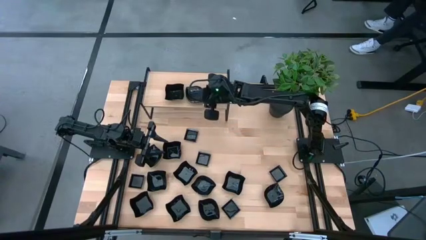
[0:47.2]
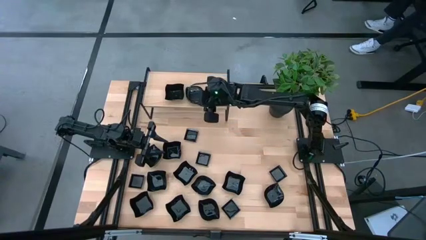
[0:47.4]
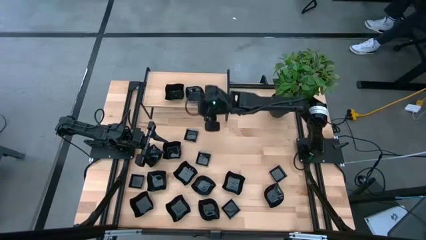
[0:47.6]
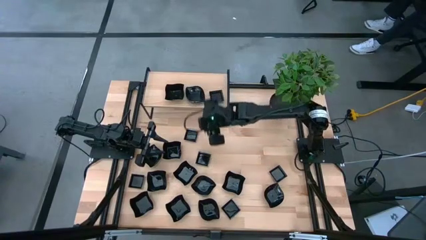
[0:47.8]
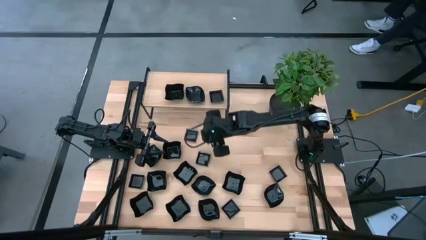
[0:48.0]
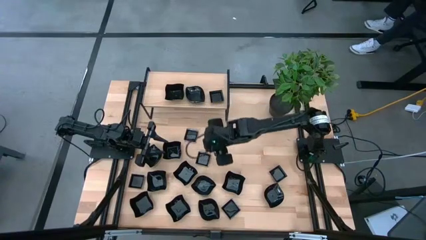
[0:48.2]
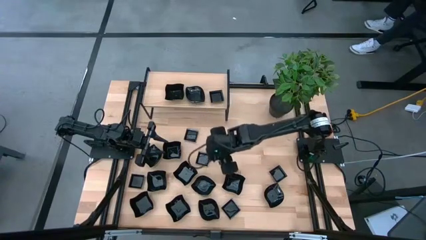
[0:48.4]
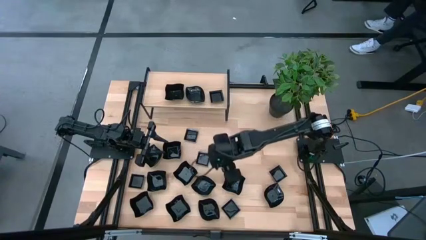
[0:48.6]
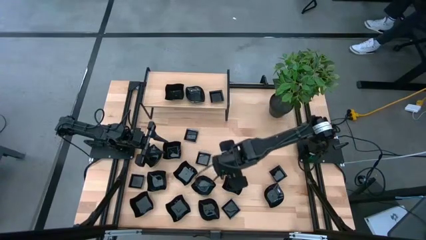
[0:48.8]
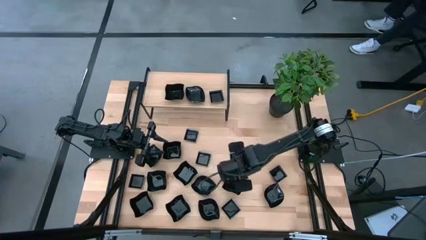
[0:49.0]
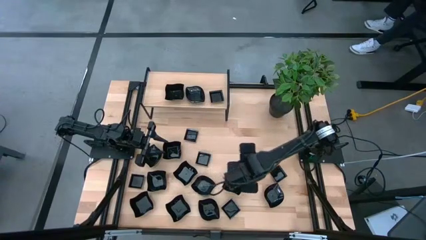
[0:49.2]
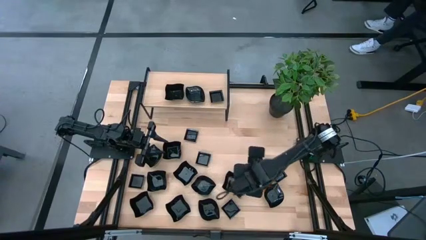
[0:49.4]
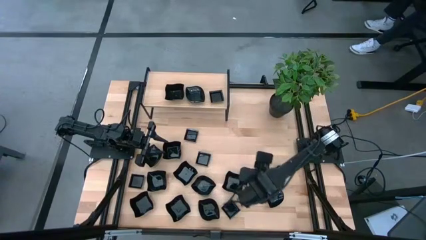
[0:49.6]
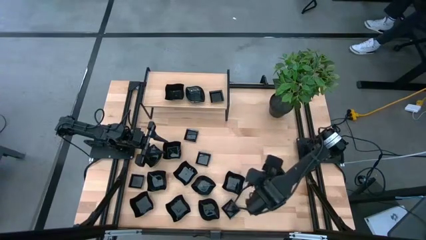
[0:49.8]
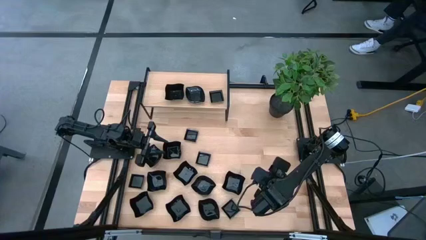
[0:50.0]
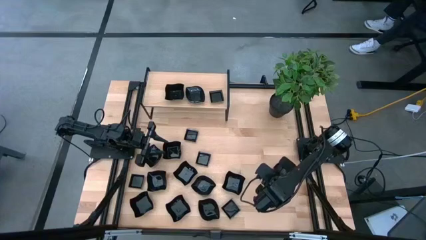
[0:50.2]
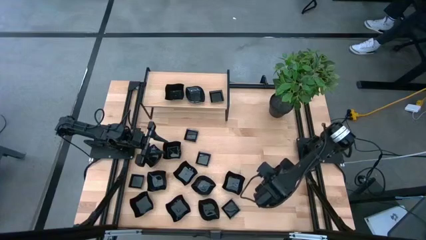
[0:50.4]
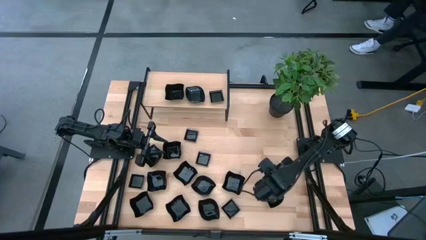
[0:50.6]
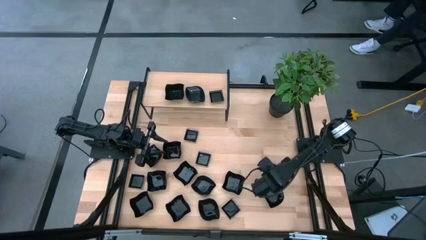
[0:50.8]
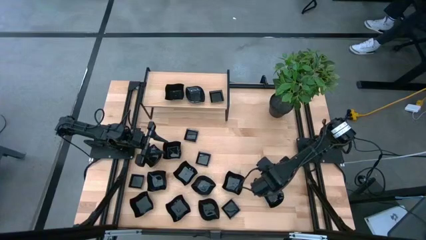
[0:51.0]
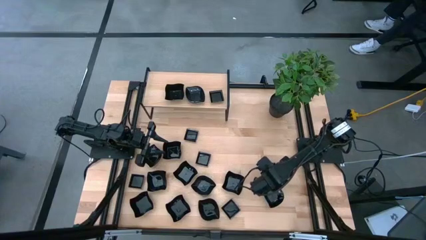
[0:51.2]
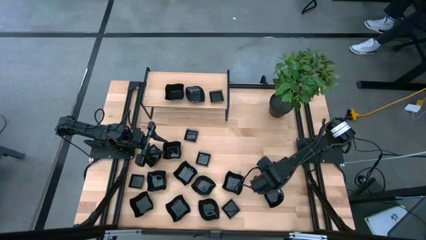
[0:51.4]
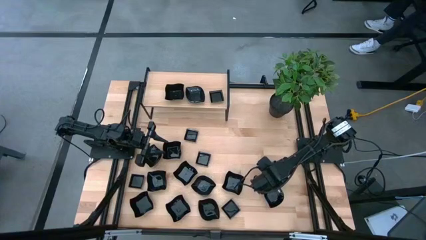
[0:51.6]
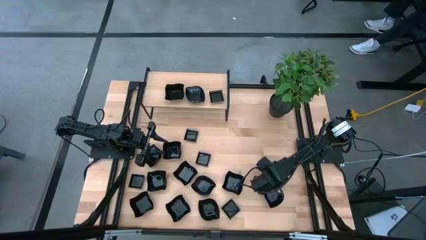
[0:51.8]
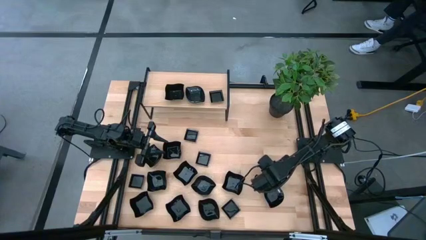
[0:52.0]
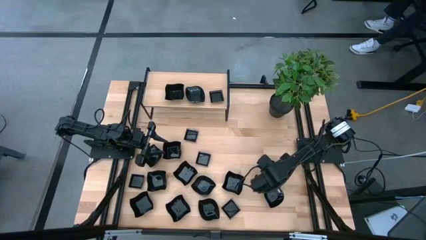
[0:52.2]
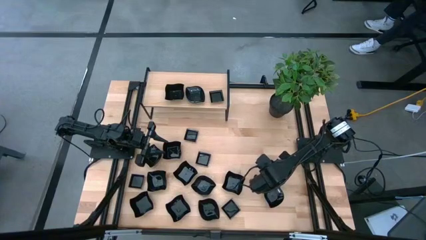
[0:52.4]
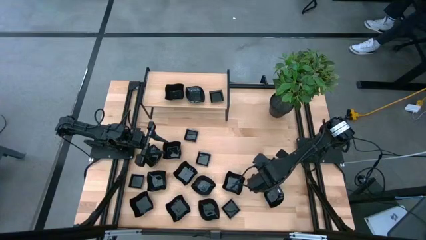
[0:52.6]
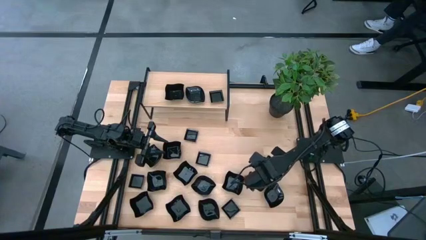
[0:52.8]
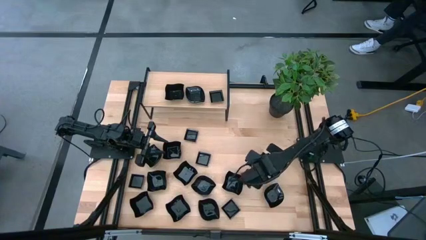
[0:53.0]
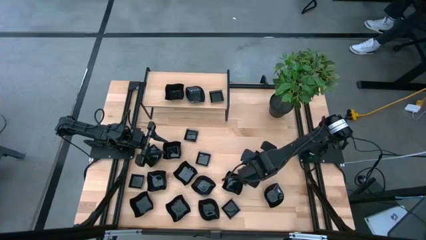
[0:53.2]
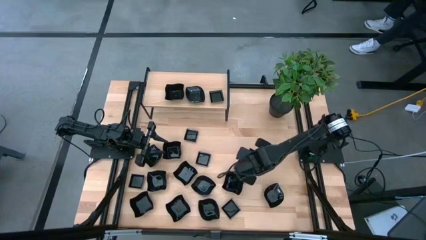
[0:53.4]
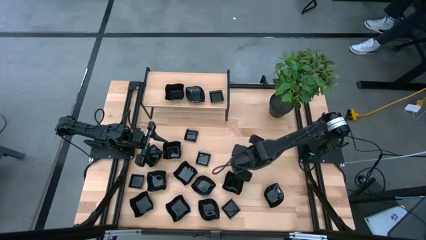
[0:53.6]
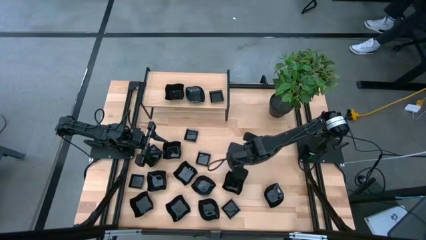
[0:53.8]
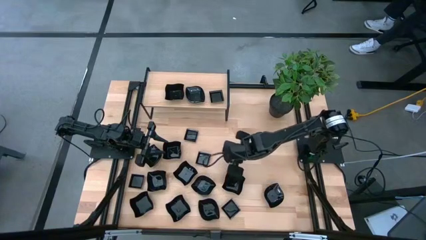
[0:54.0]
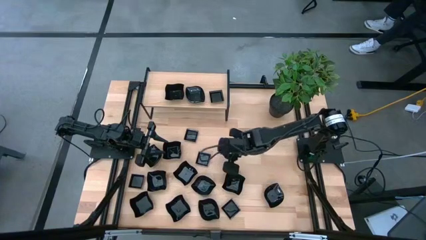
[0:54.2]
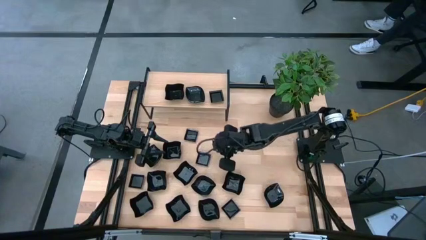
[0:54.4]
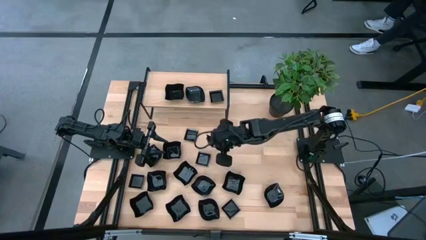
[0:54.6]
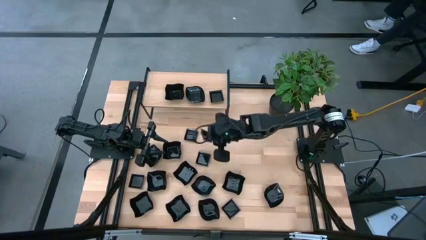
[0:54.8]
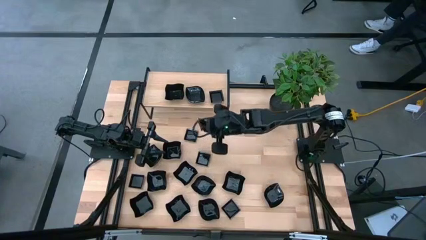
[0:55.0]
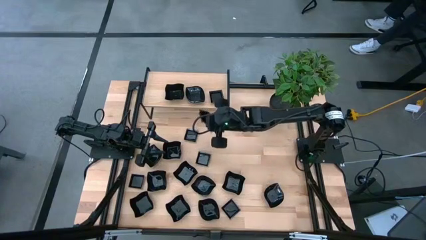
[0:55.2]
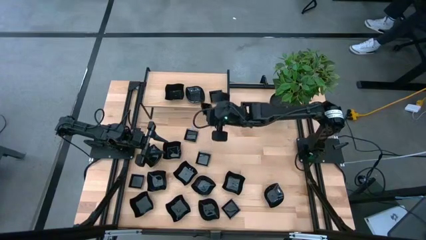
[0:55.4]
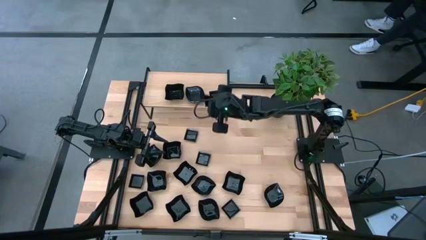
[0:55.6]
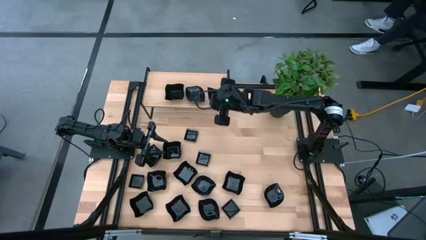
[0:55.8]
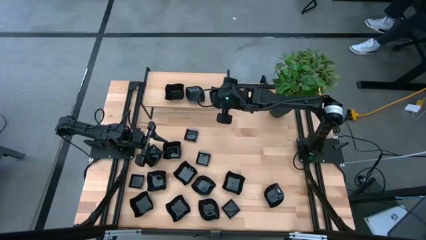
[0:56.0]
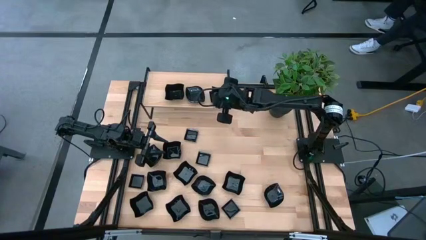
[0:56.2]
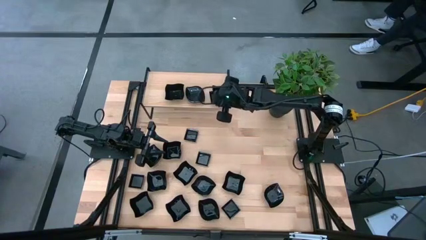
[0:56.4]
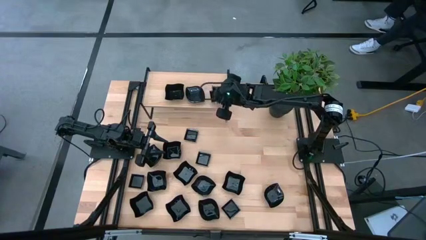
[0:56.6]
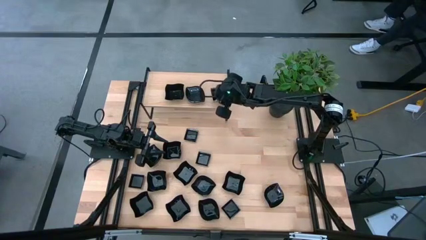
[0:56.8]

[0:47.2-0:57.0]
Task: Pick & Place Mini shaped plates
Stack the square plate on top of the square plate on the shelf

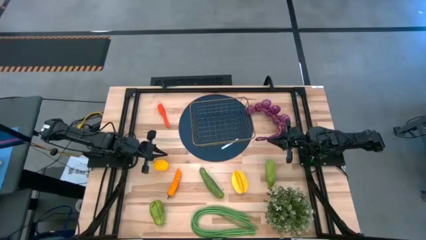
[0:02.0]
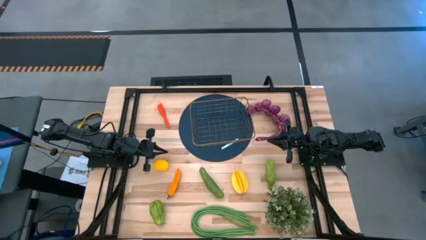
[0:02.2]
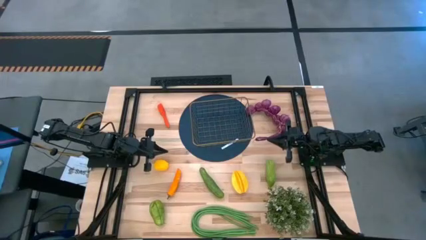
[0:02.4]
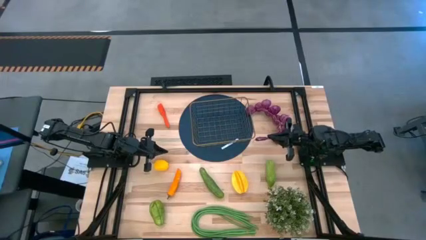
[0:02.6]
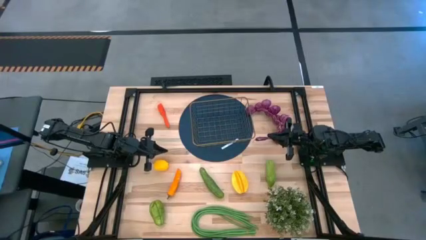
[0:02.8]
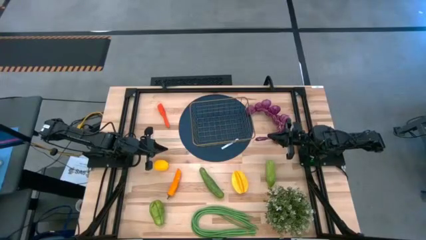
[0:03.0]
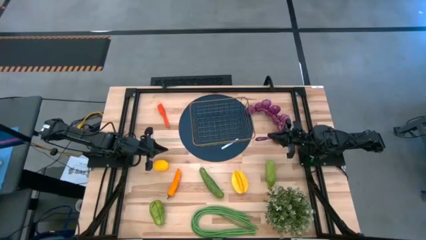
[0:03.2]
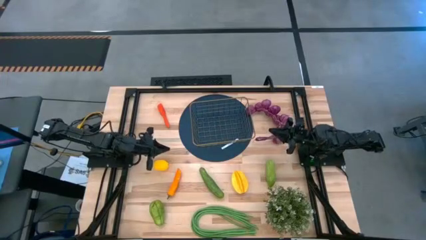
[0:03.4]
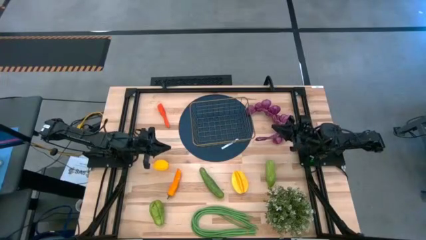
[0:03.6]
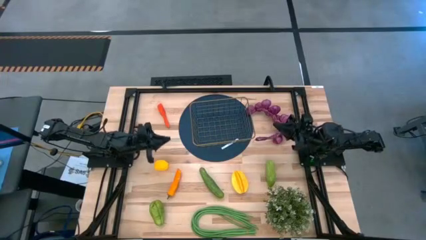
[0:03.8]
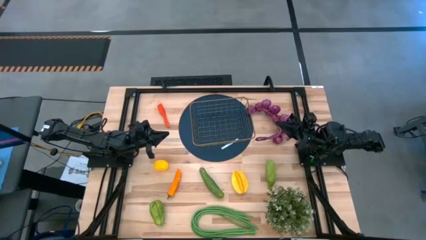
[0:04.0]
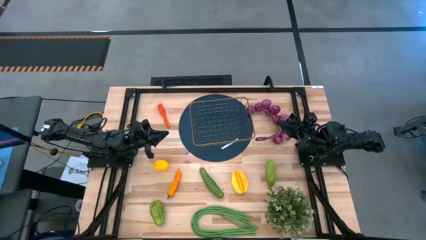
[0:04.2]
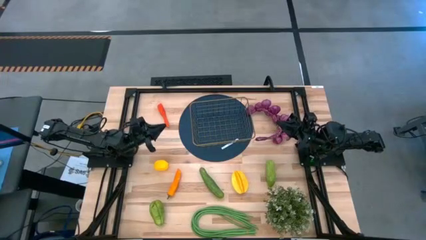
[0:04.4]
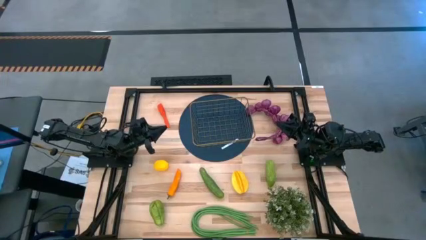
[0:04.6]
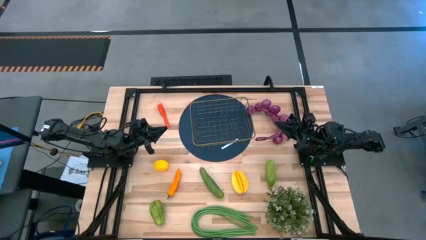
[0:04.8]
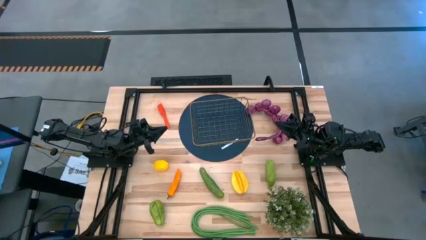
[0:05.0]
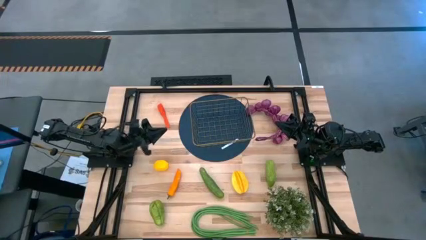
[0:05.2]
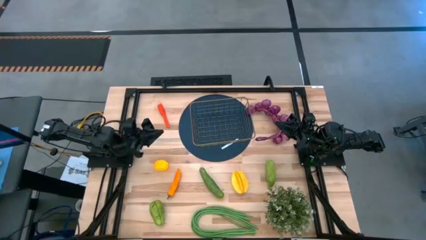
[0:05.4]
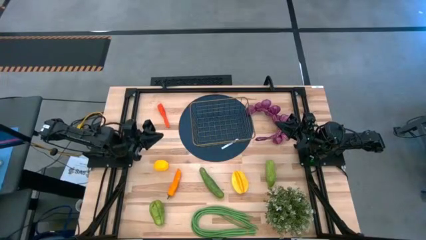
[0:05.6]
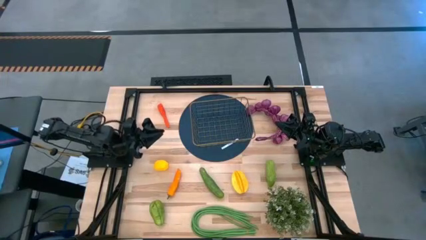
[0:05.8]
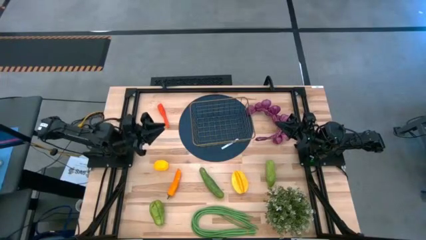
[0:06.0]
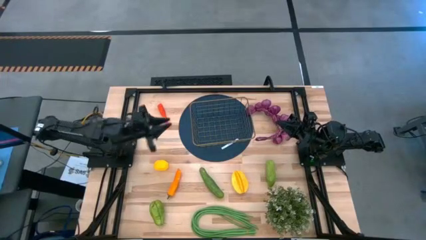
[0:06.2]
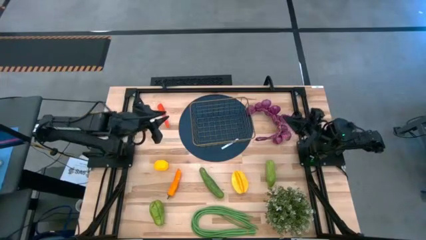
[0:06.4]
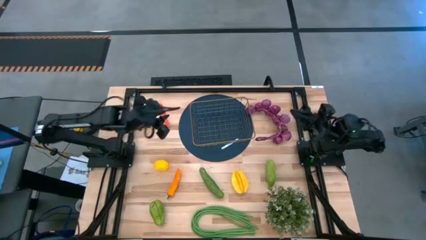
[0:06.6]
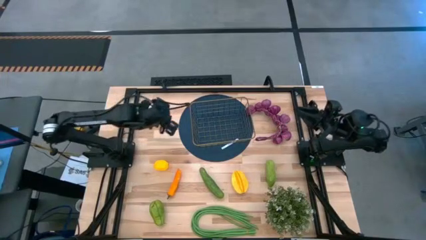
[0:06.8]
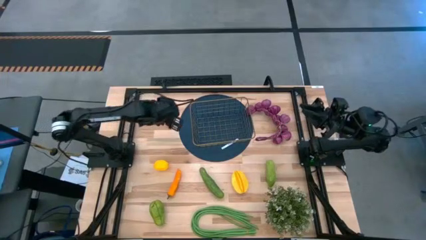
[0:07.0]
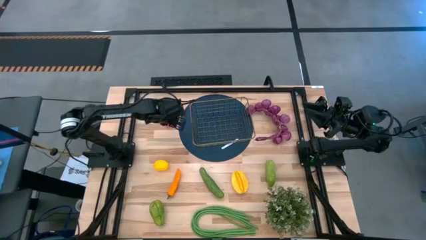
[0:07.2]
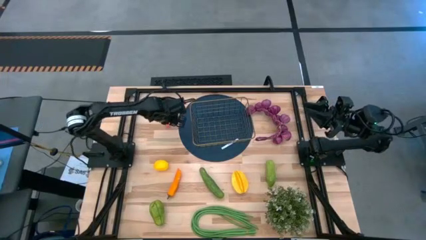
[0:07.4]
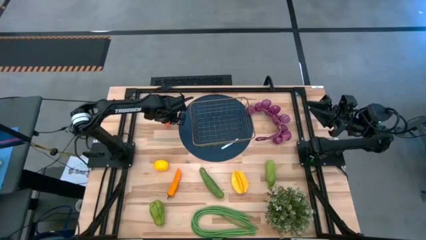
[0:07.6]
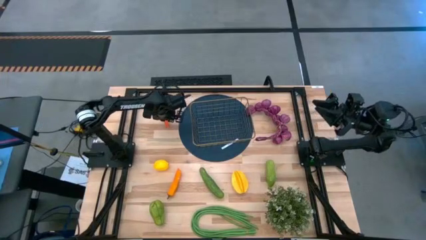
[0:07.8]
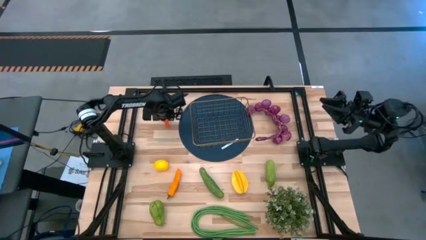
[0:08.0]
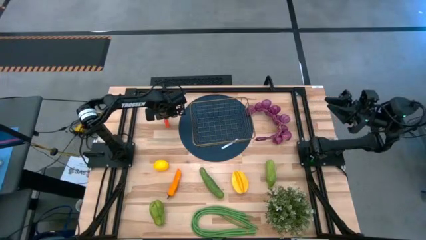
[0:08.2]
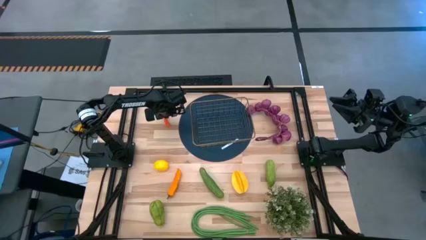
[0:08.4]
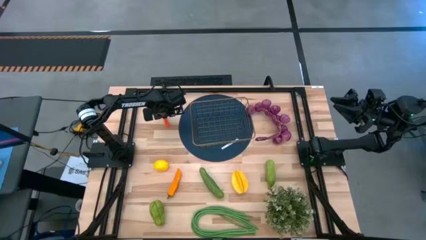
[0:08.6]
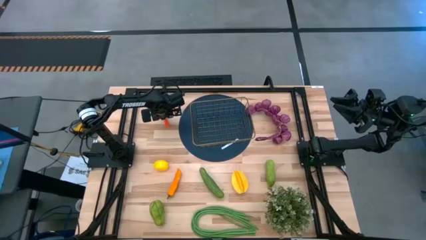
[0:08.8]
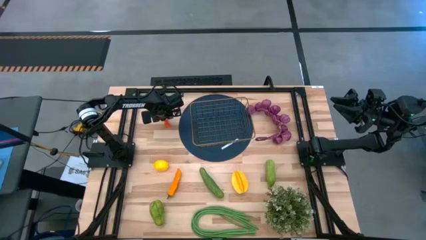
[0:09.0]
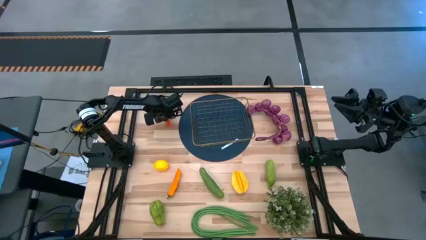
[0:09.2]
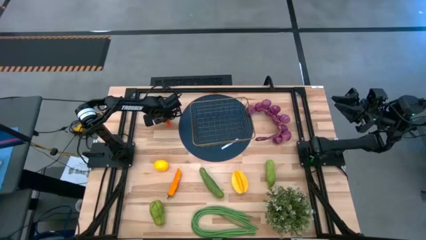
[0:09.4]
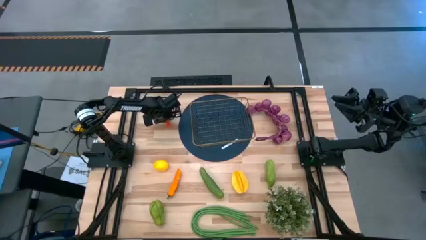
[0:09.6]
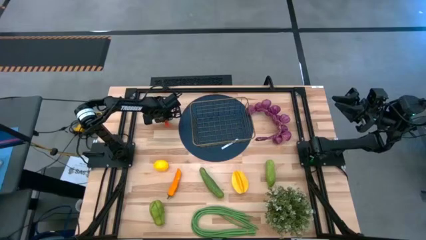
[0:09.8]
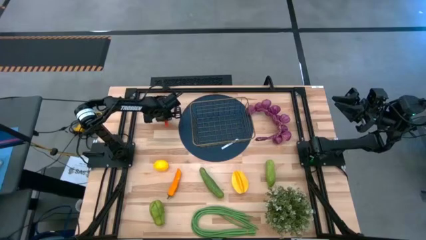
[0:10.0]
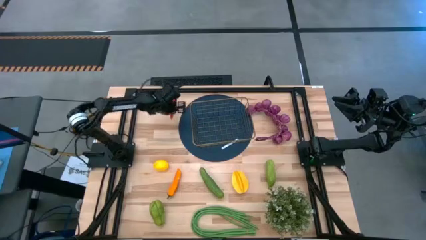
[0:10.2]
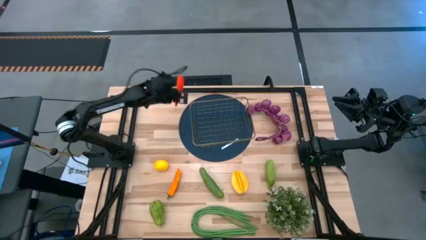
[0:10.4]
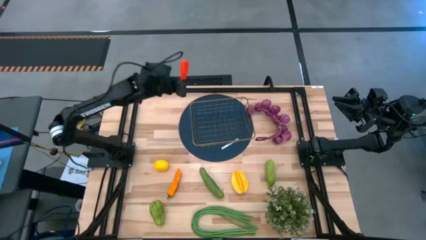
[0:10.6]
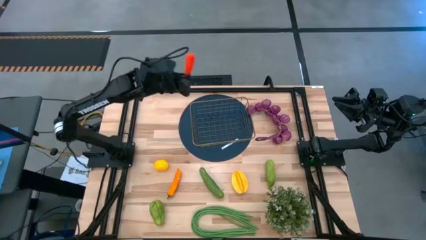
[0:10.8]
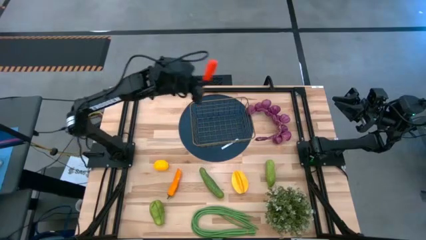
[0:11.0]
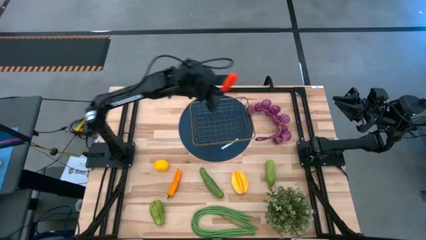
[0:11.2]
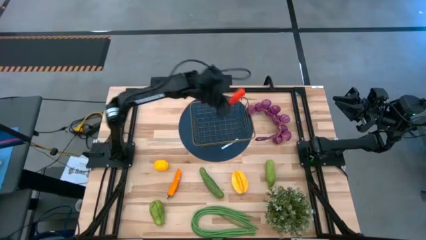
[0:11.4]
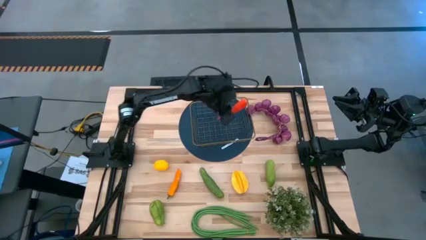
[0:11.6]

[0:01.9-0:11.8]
Task: Build produce basket
Put the carrot into the wire basket
